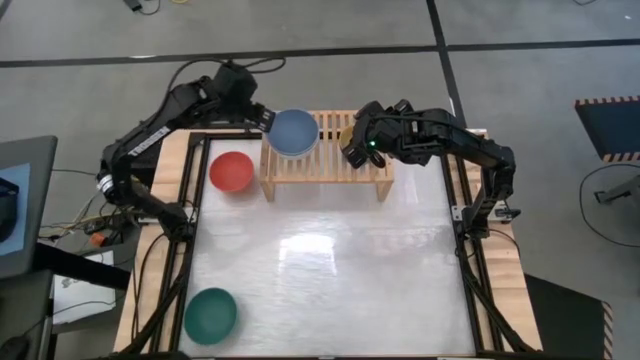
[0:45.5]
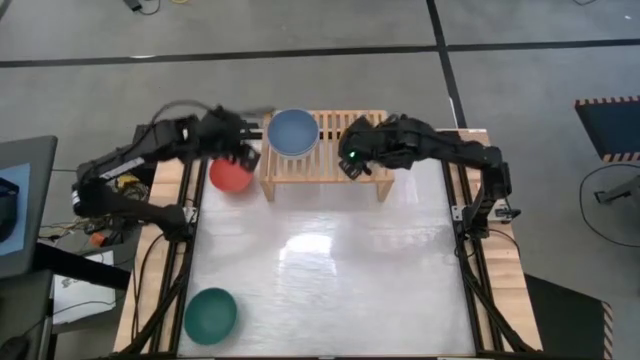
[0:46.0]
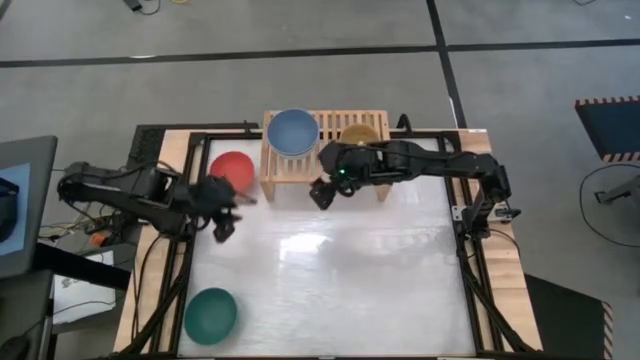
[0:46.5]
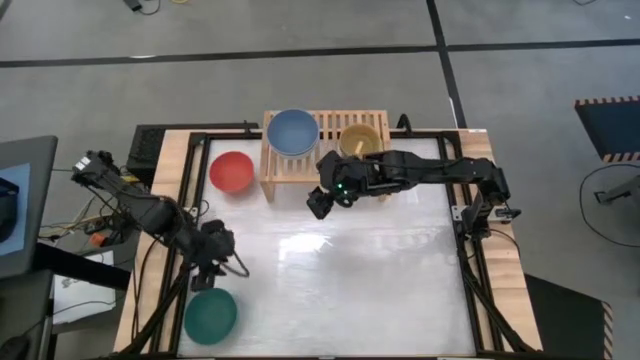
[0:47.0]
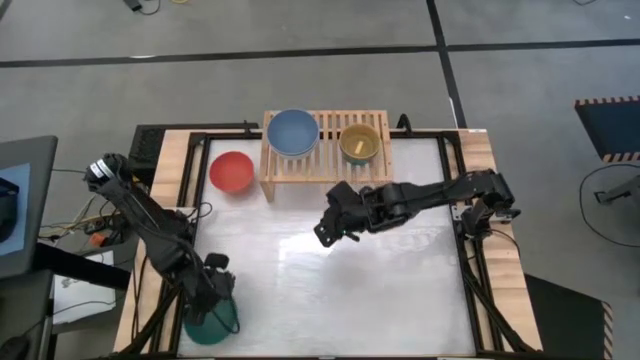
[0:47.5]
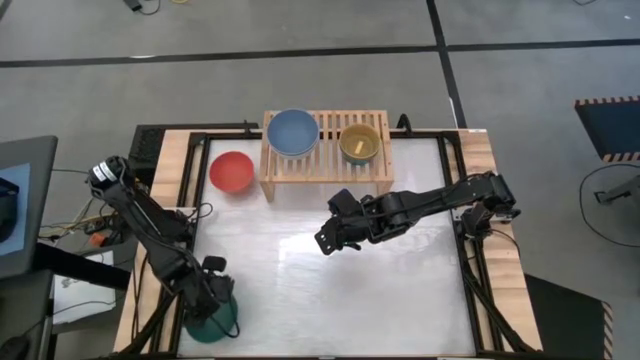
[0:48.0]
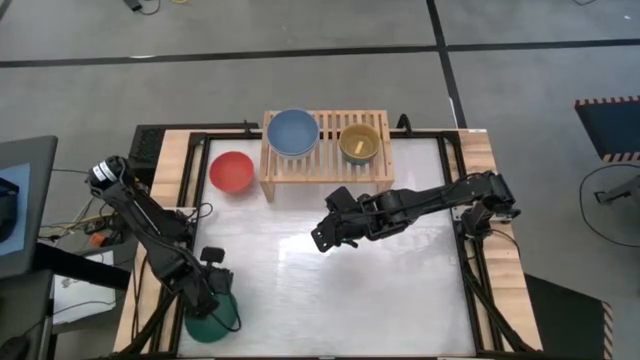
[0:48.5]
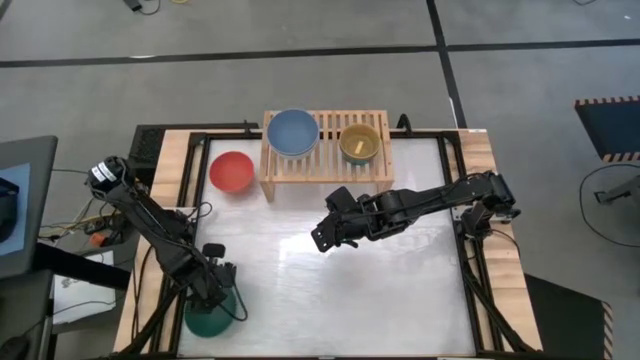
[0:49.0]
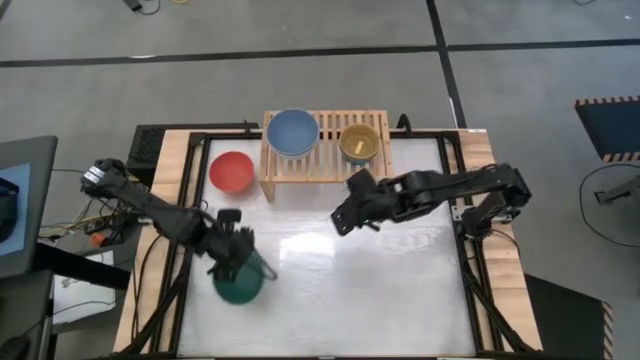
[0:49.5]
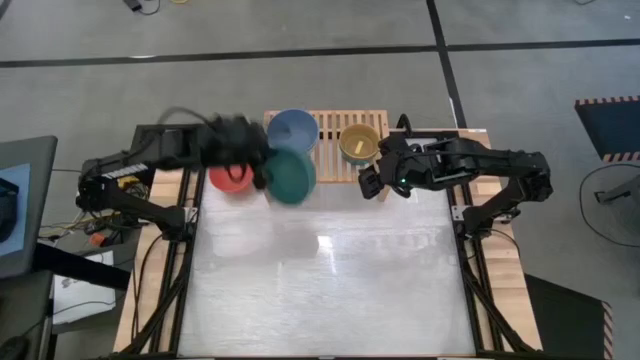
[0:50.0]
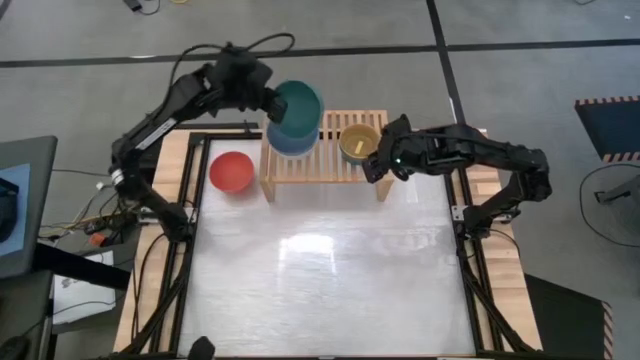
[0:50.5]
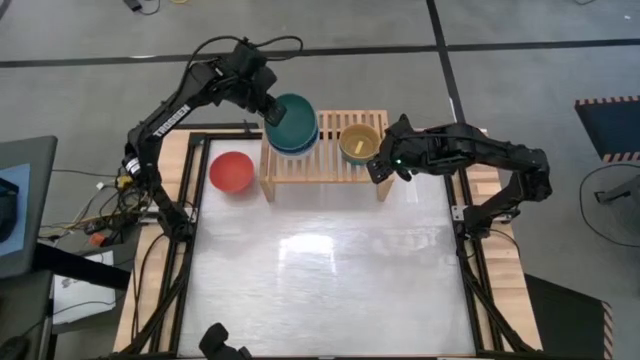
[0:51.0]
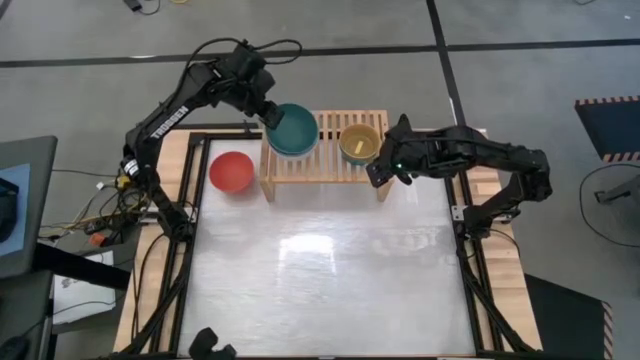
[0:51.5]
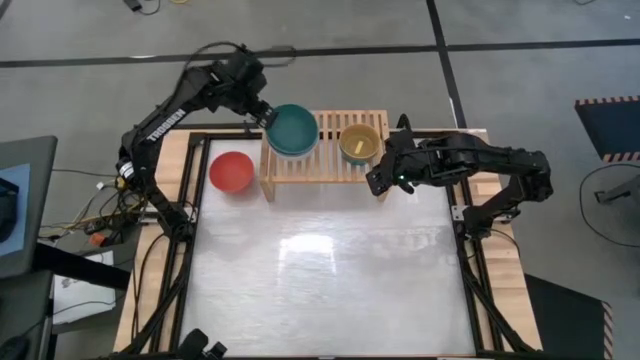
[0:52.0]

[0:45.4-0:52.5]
Task: Place and stack bowls onto a shelf
Stack the large green bowl on top of the large blue bowl on the shelf

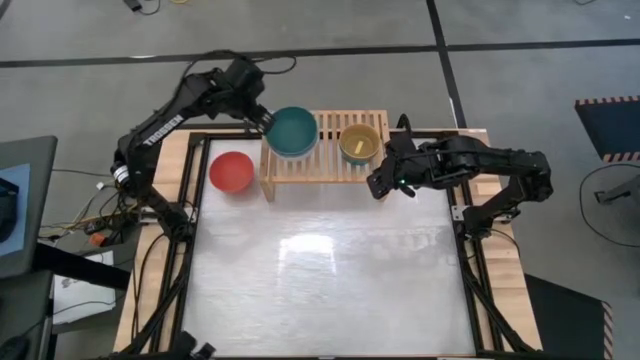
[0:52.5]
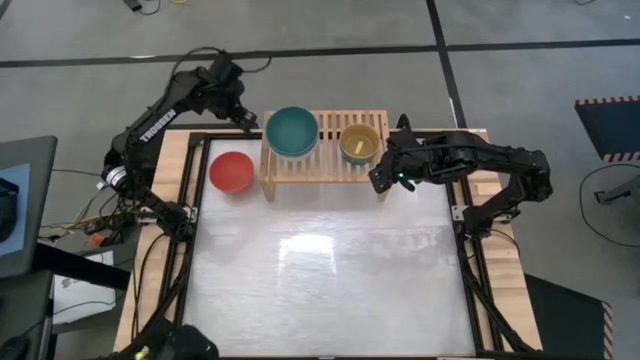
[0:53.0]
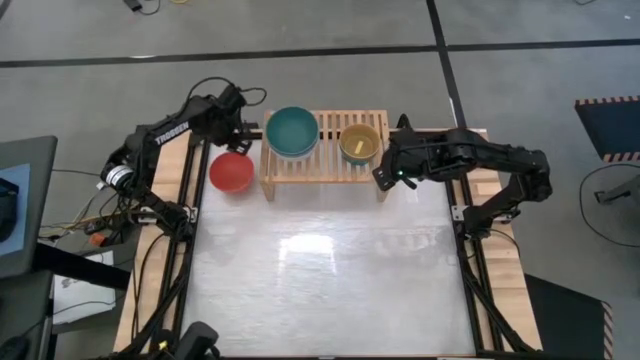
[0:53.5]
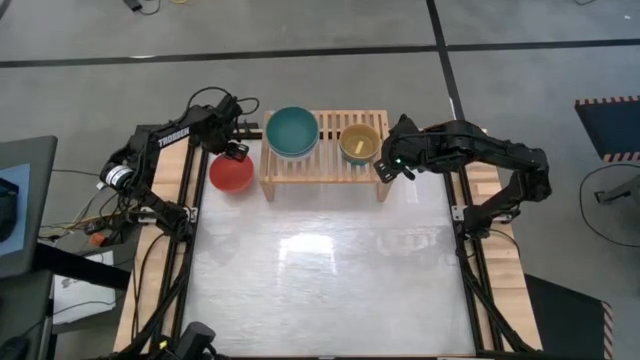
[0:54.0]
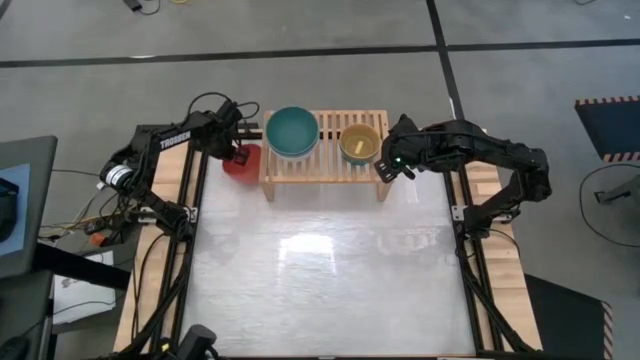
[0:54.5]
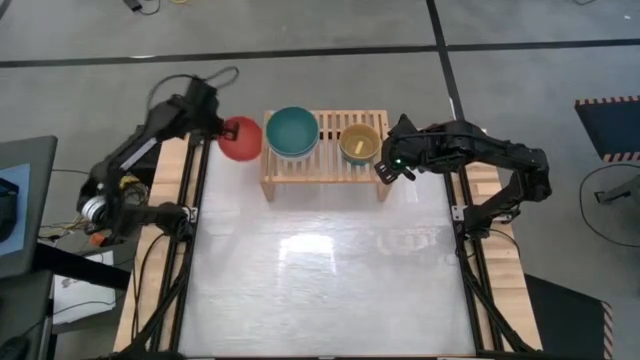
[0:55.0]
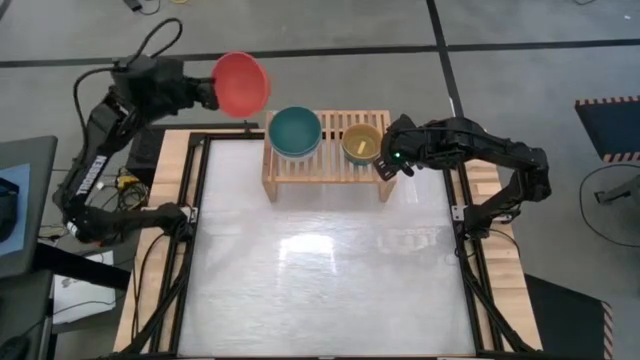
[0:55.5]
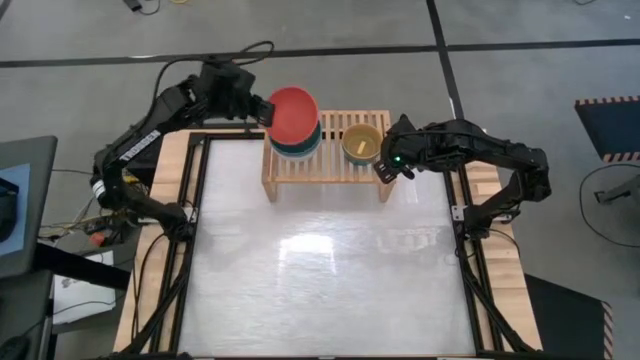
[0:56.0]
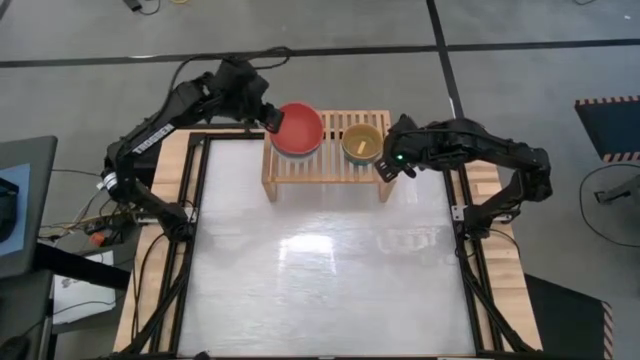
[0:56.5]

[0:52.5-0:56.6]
Stack the large orange bowl on top of the large green bowl on the shelf

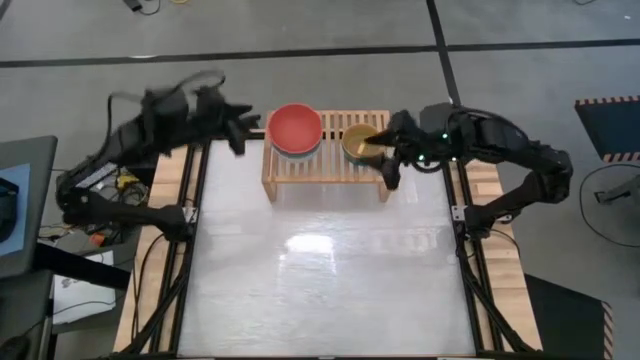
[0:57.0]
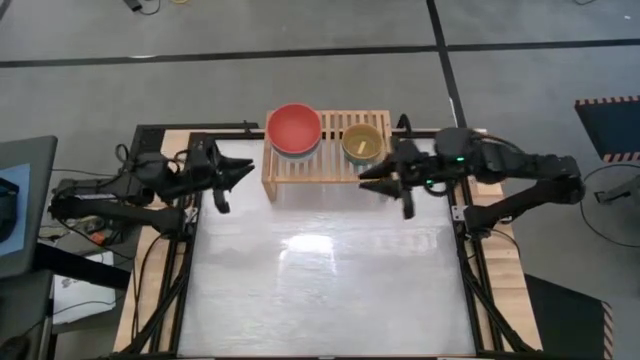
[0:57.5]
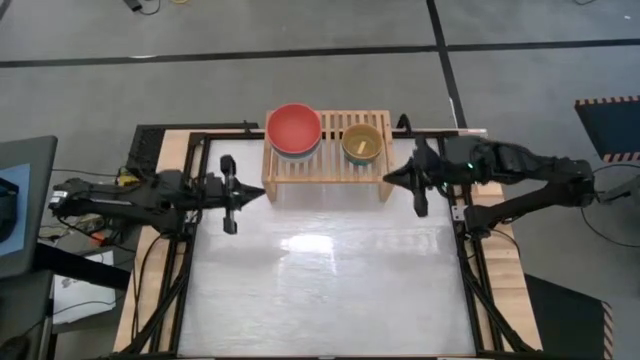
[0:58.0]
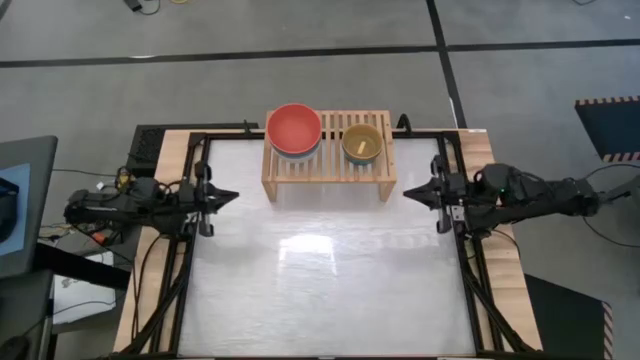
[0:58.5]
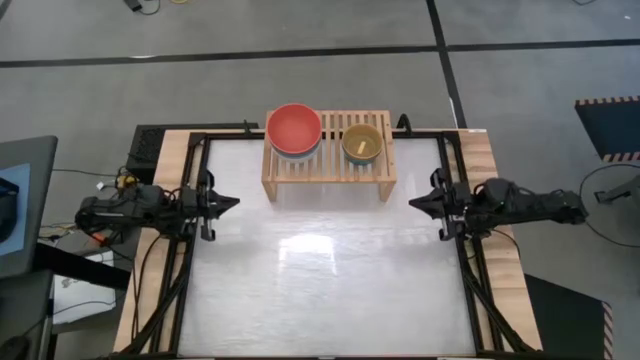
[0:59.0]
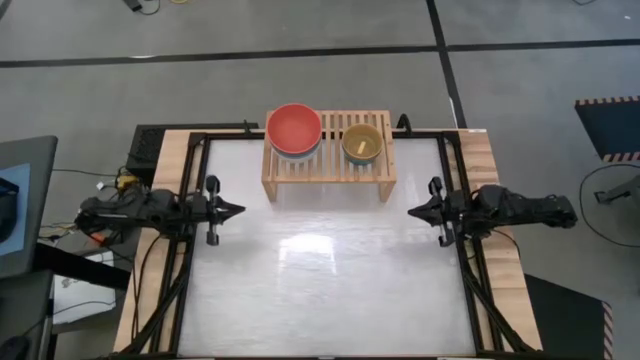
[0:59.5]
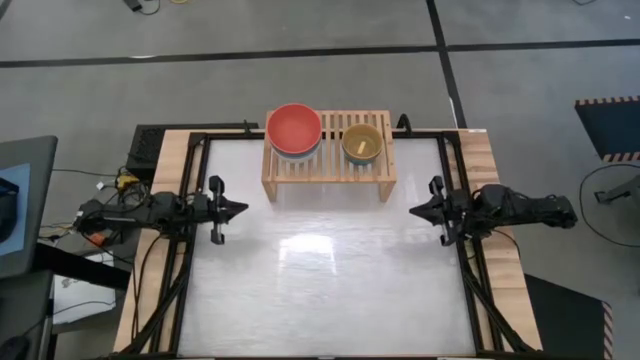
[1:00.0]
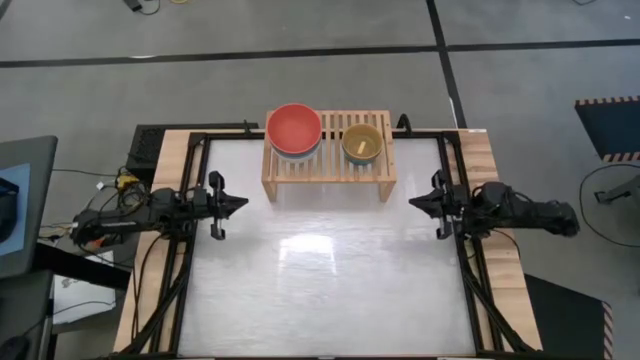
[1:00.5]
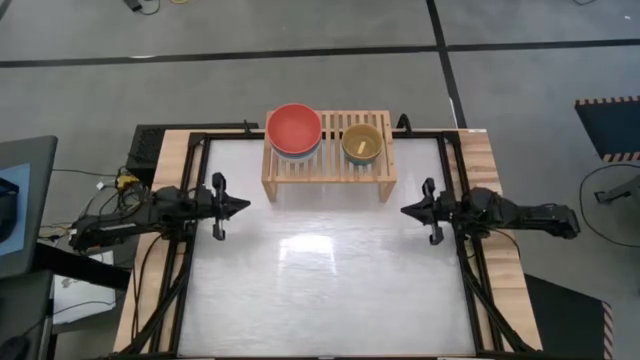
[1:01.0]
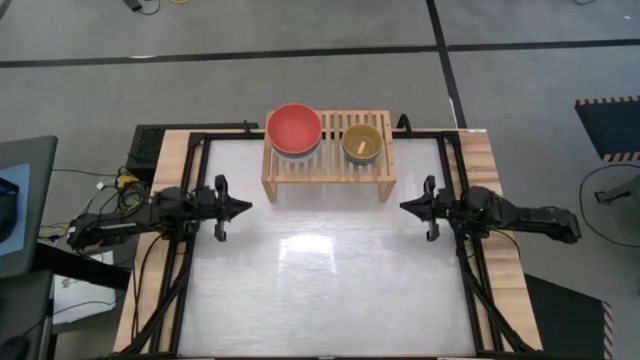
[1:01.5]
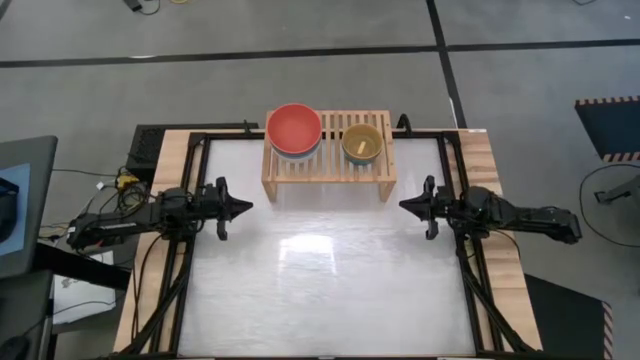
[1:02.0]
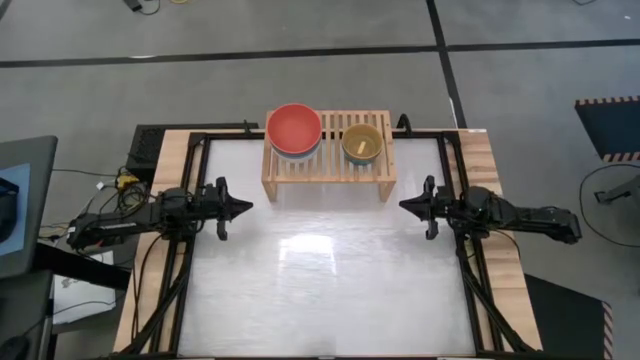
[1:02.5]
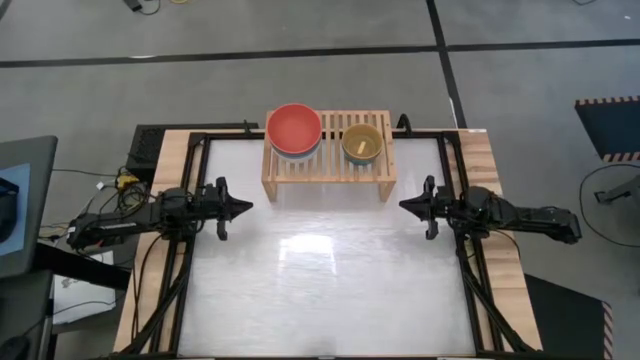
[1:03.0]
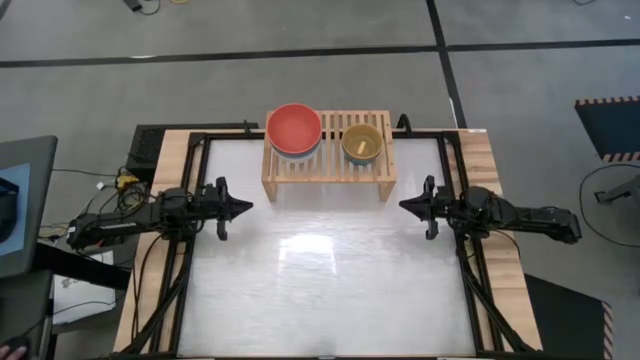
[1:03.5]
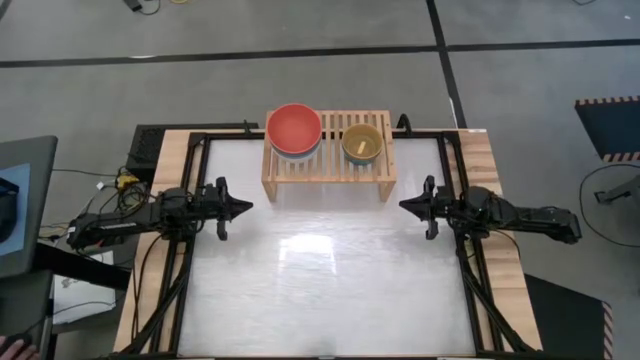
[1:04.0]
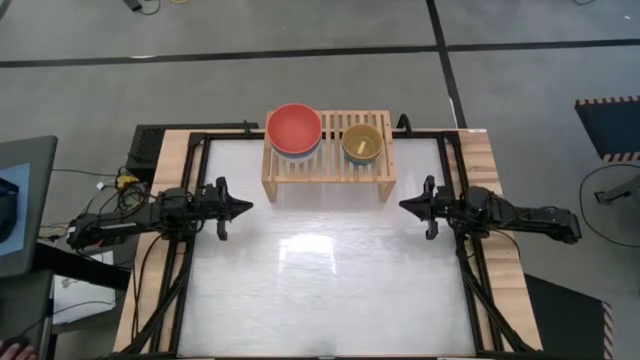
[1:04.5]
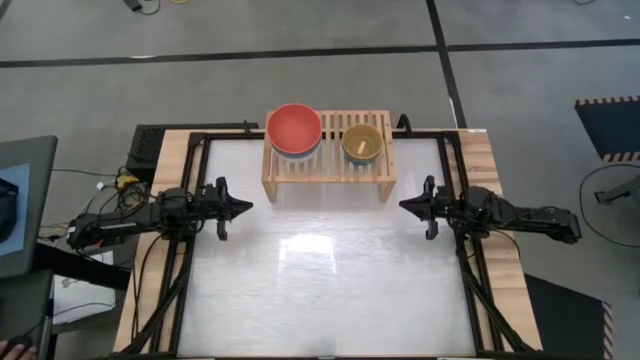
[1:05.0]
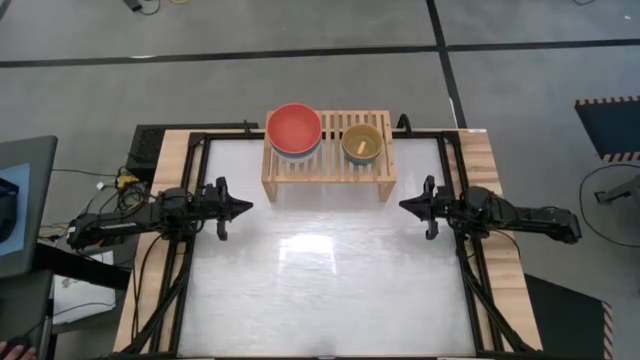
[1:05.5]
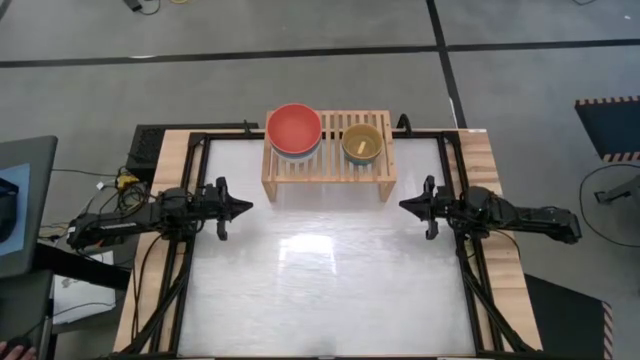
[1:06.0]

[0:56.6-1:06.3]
Return to Home Position

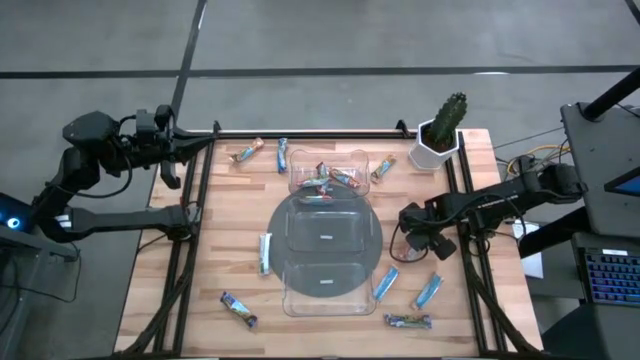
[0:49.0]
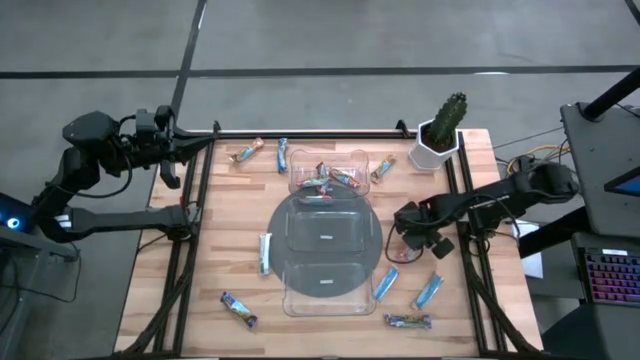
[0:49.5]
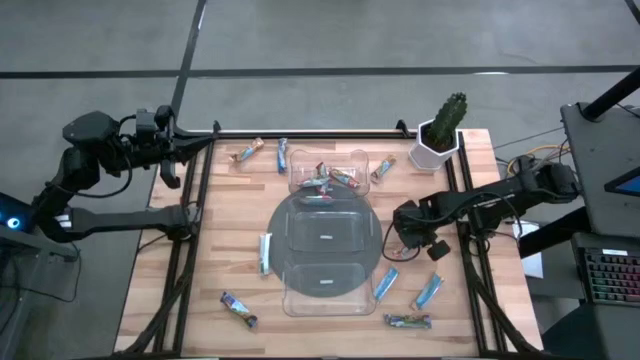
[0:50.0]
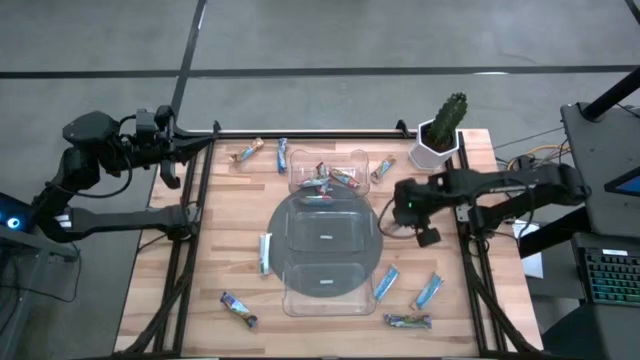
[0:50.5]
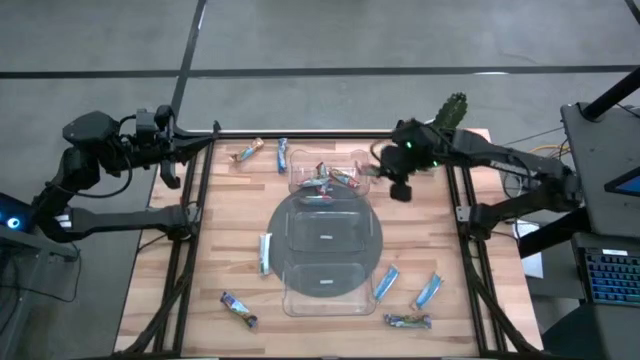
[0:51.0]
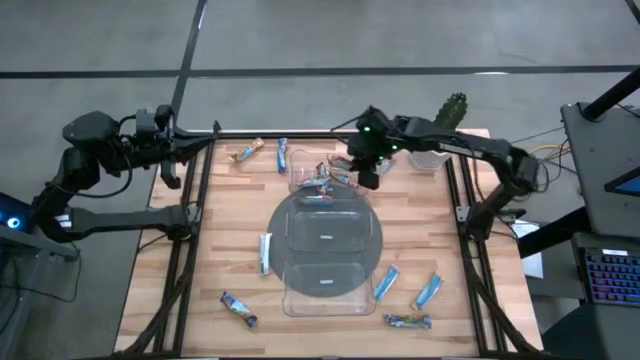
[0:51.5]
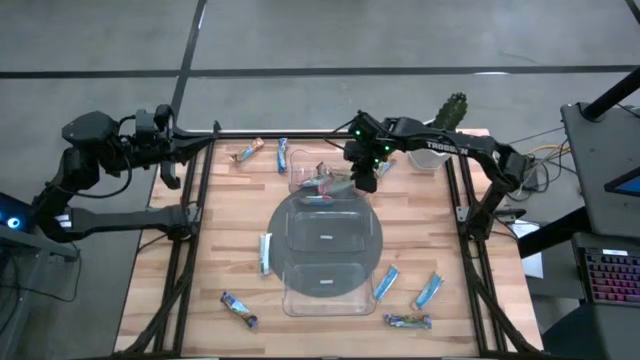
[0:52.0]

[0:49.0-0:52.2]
Task: Pick and place Granola Bars by type
Put the red granola bar into the top transparent bin
